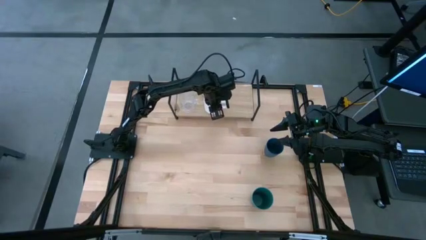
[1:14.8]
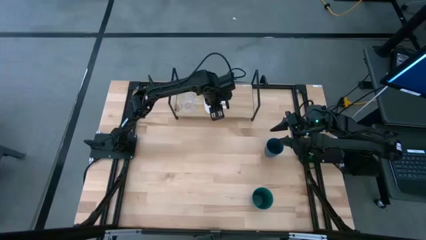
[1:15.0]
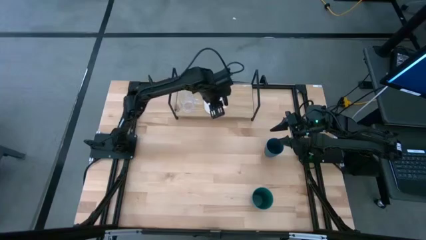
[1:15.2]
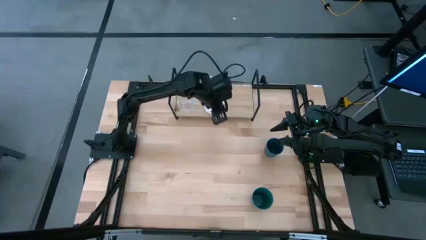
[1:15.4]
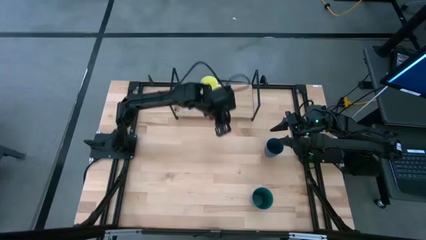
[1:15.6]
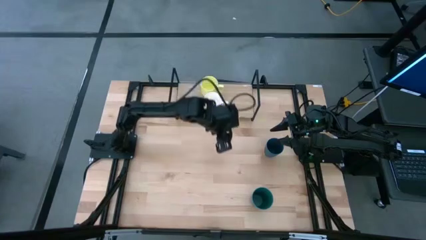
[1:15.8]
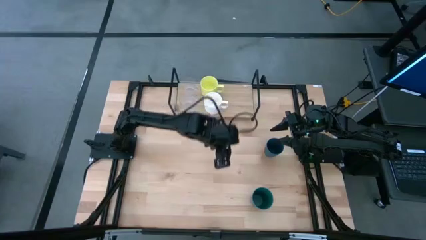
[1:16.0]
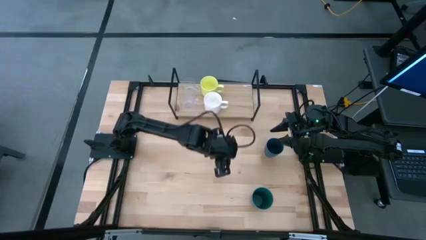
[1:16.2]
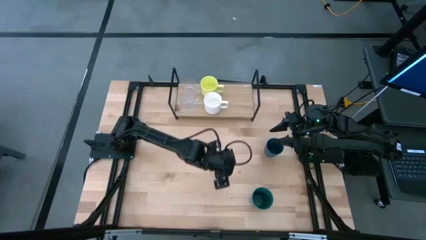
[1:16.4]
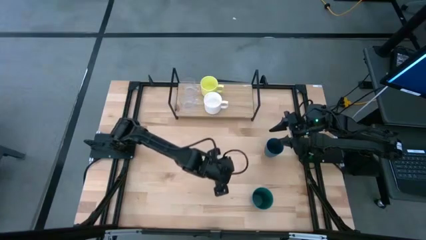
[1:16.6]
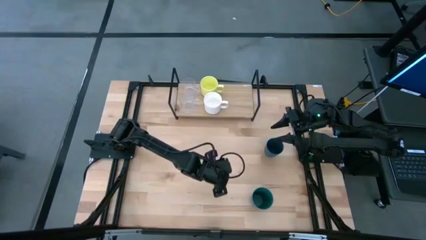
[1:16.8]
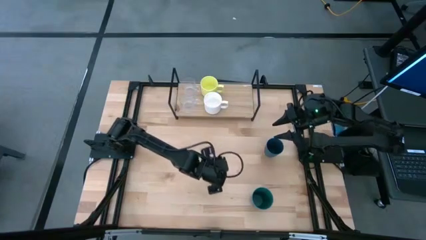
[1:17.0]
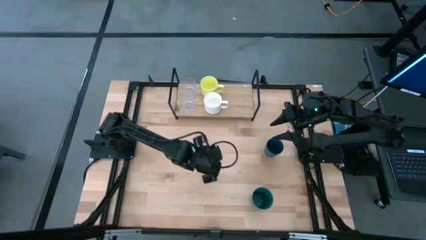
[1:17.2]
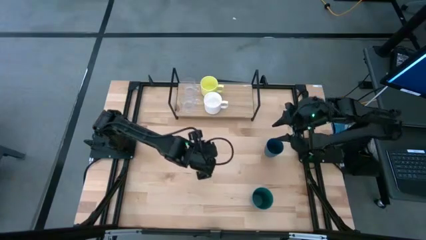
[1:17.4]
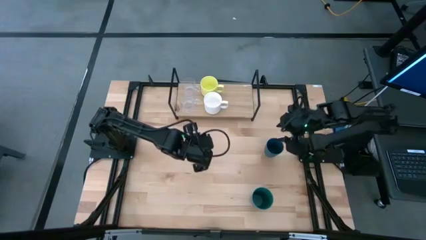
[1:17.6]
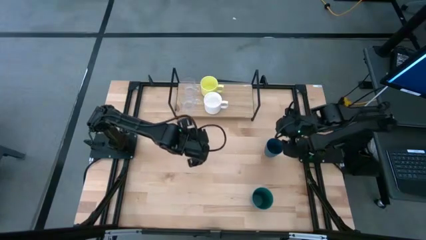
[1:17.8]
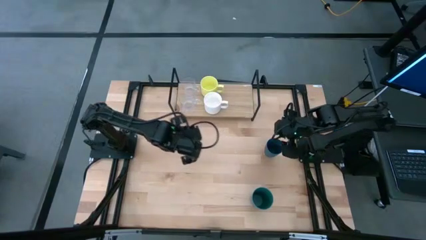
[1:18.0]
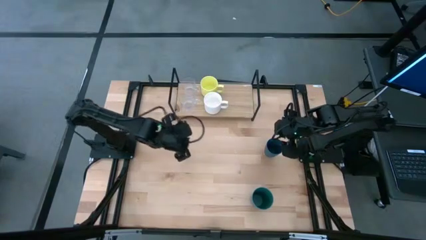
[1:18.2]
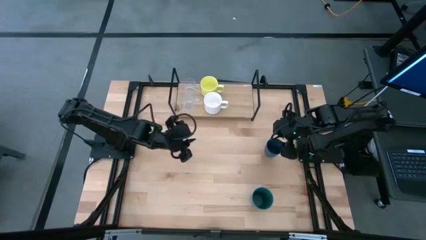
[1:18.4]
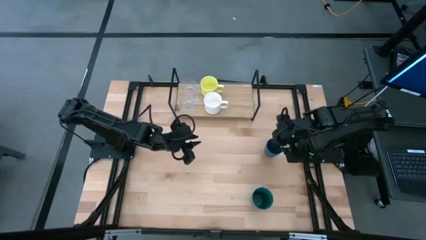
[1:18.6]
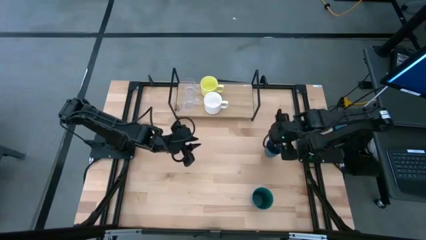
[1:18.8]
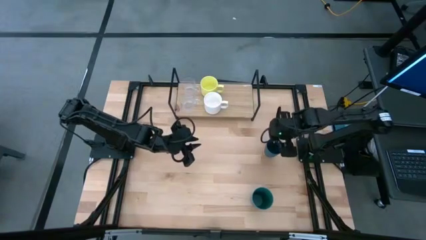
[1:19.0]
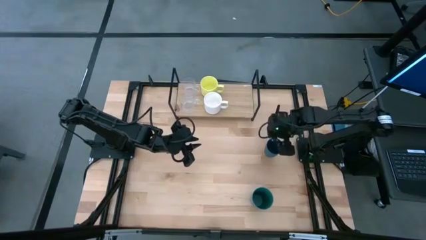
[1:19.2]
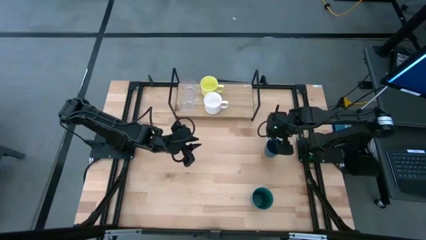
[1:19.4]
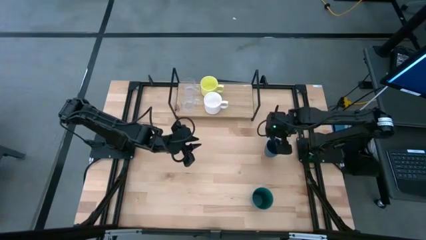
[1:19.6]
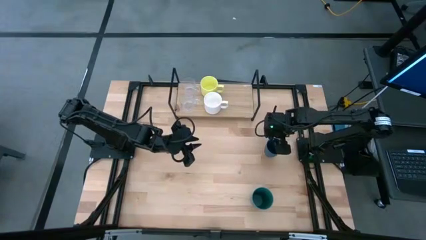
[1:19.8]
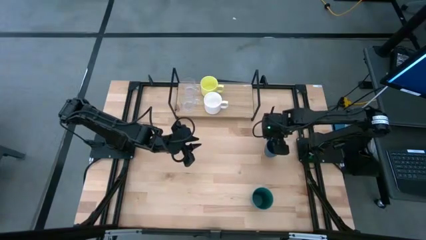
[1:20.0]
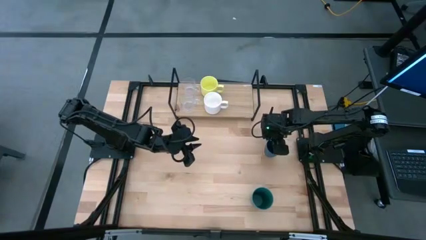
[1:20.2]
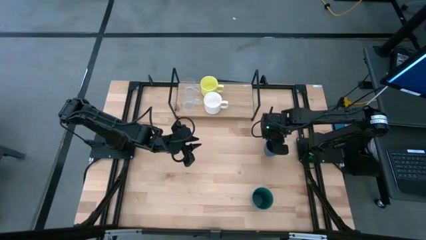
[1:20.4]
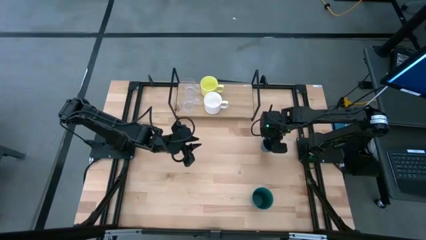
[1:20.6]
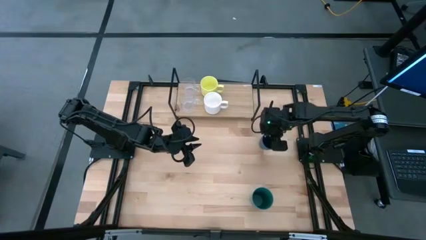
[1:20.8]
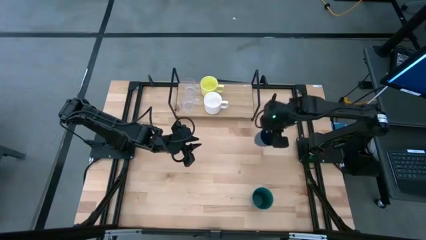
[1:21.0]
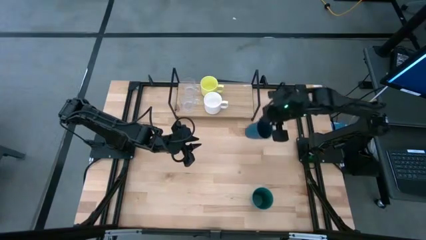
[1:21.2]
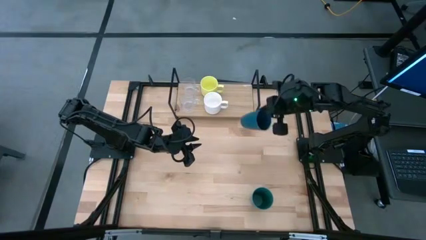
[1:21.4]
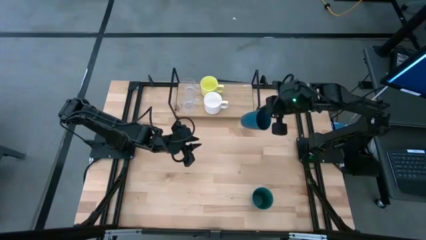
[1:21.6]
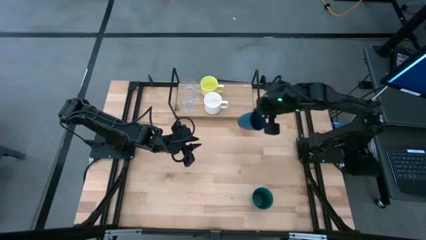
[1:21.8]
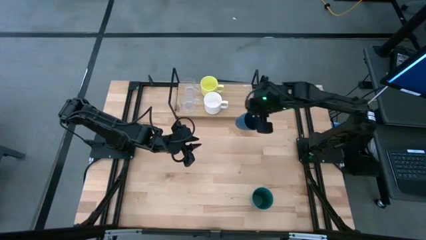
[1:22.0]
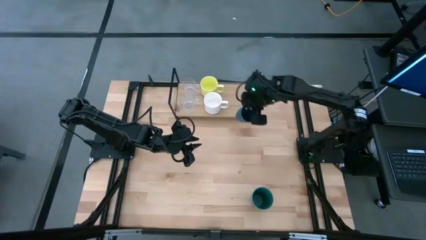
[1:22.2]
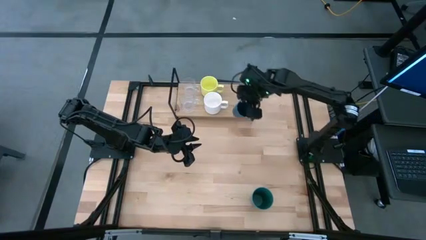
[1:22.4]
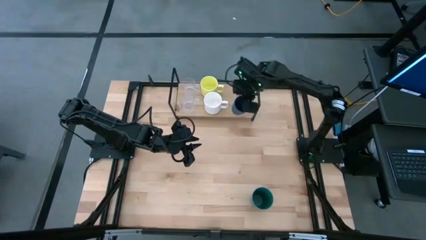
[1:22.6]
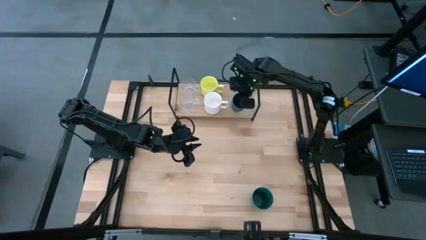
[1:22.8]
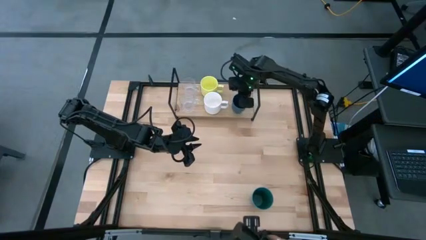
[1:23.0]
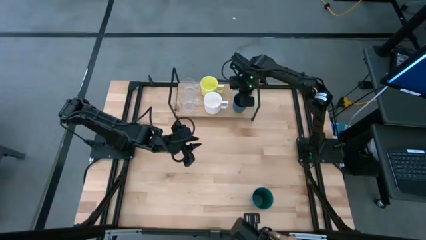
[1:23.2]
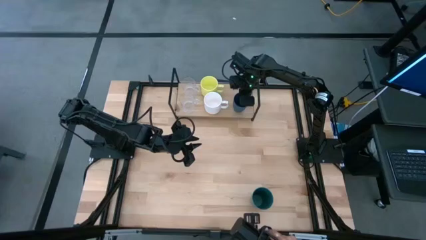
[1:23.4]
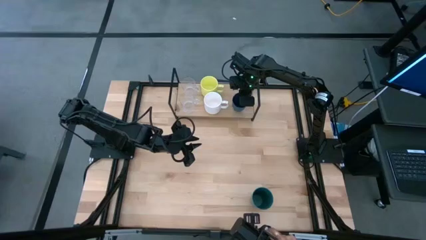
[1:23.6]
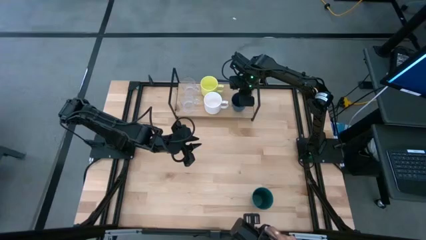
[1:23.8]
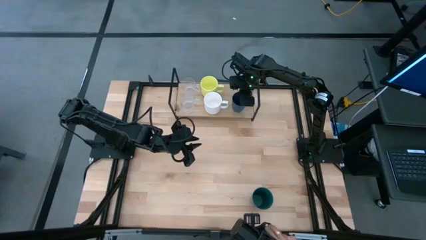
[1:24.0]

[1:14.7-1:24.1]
Task: Stack small to large cups/mugs on shelf
Put the dark blue cup on the shelf

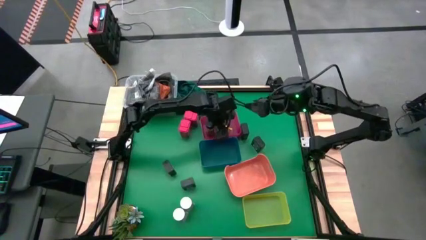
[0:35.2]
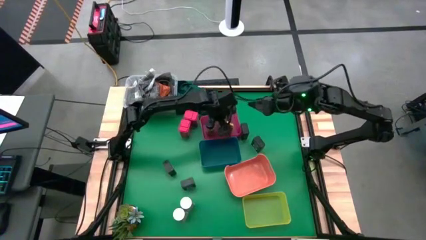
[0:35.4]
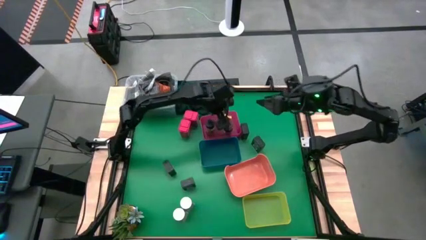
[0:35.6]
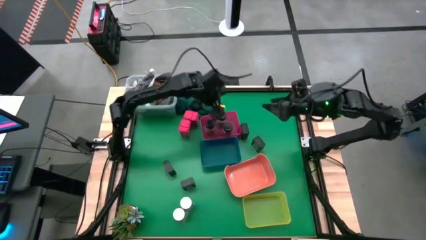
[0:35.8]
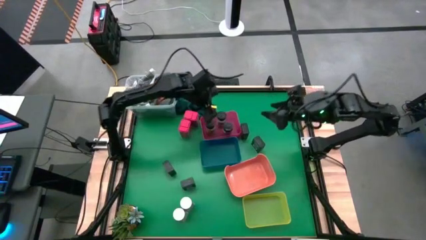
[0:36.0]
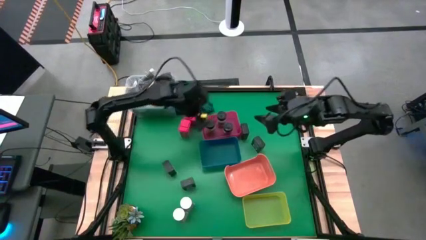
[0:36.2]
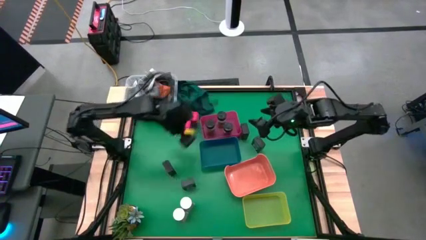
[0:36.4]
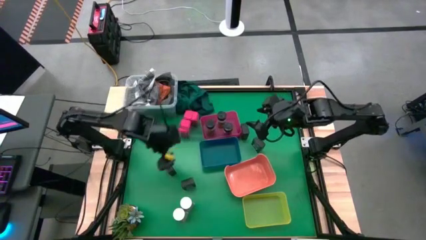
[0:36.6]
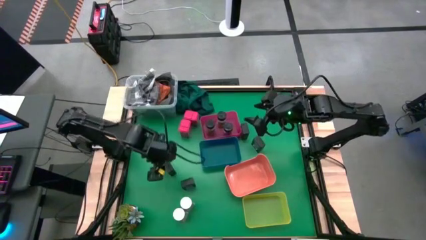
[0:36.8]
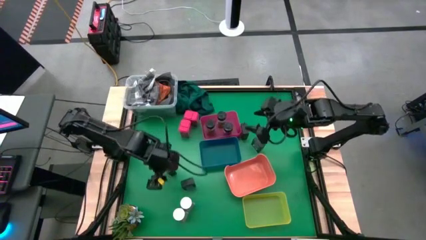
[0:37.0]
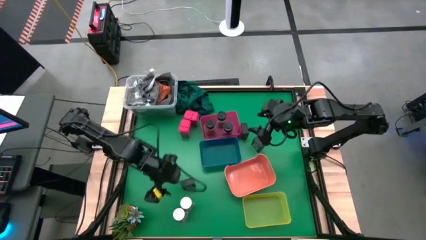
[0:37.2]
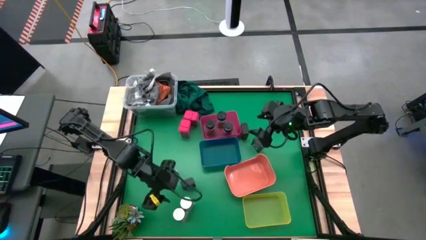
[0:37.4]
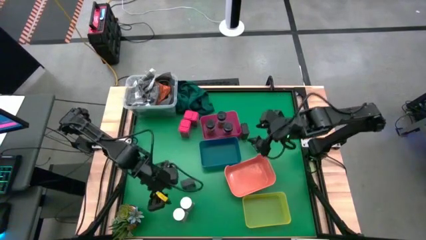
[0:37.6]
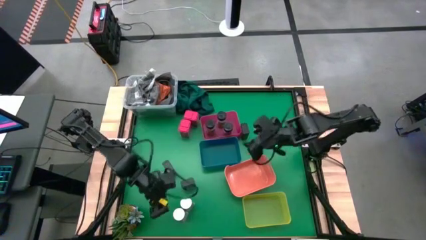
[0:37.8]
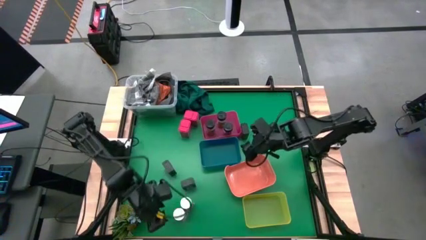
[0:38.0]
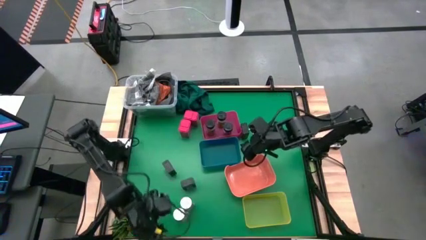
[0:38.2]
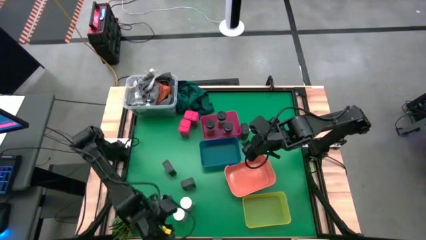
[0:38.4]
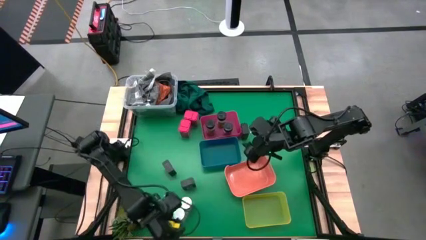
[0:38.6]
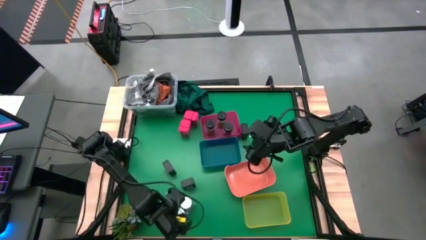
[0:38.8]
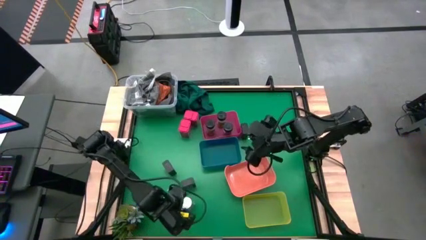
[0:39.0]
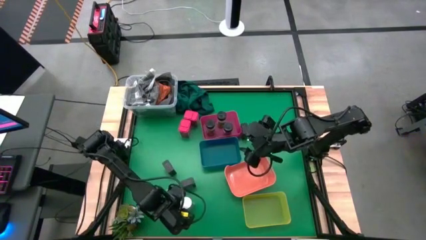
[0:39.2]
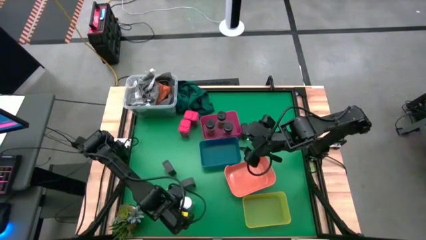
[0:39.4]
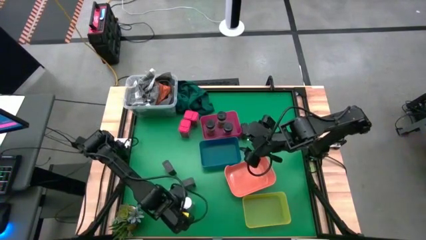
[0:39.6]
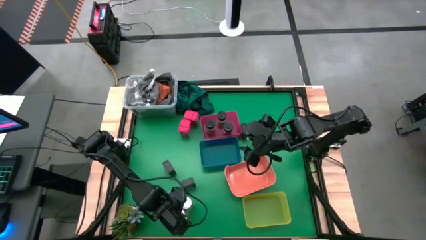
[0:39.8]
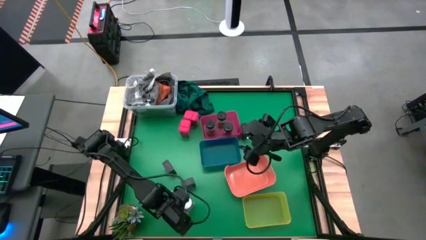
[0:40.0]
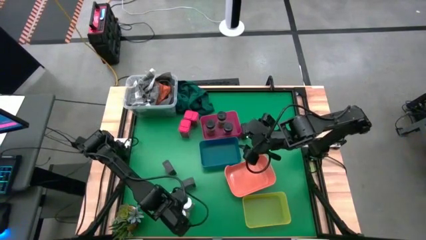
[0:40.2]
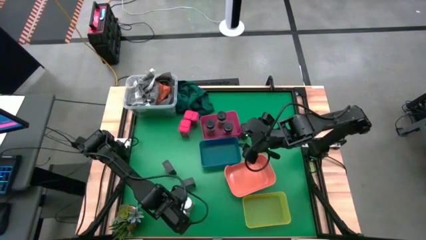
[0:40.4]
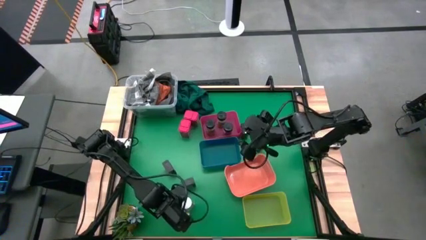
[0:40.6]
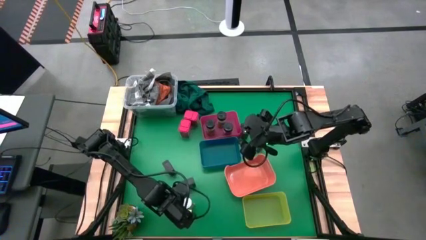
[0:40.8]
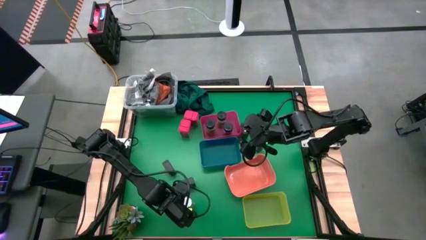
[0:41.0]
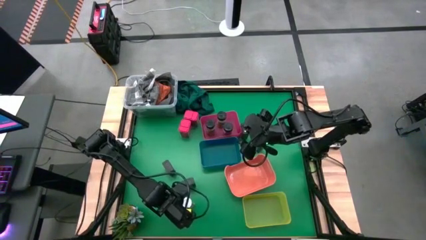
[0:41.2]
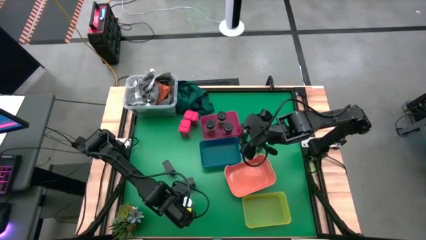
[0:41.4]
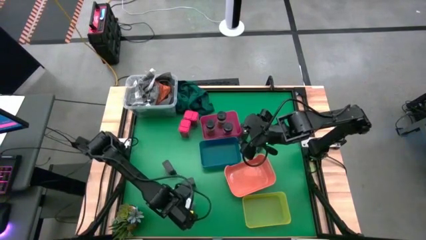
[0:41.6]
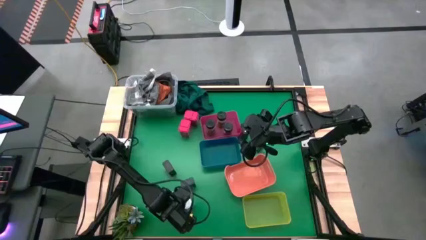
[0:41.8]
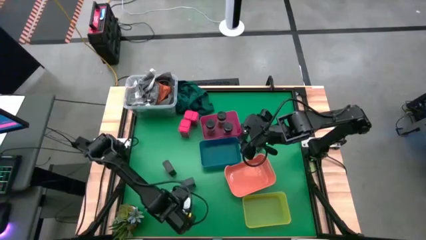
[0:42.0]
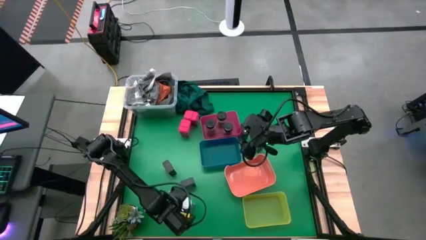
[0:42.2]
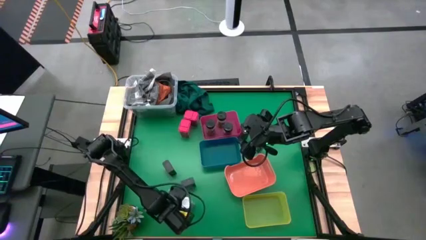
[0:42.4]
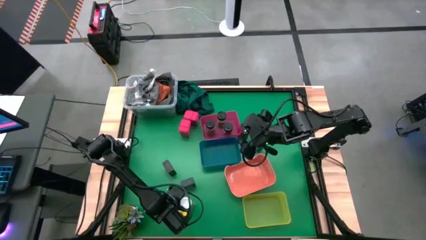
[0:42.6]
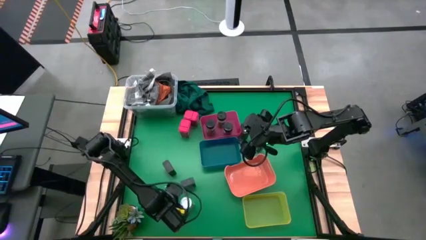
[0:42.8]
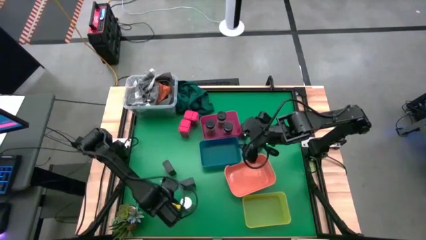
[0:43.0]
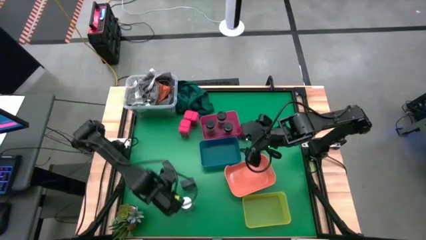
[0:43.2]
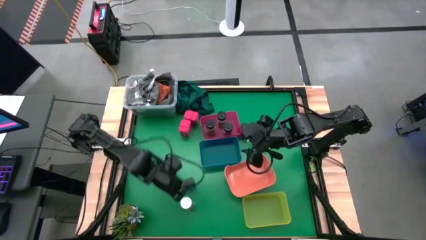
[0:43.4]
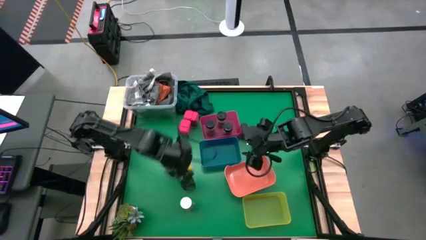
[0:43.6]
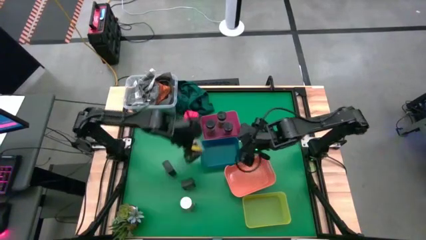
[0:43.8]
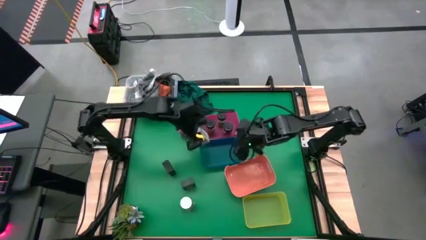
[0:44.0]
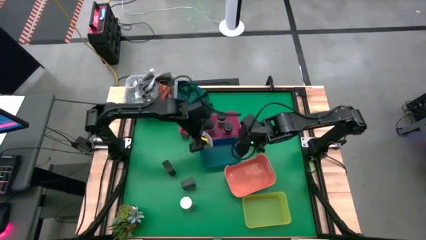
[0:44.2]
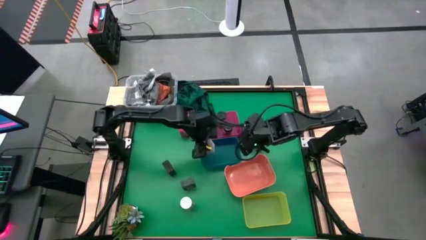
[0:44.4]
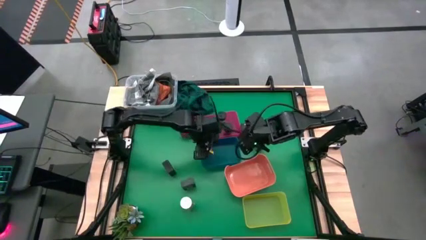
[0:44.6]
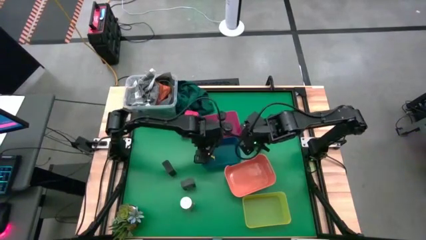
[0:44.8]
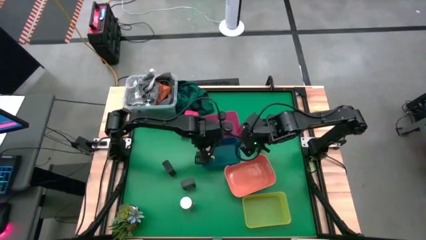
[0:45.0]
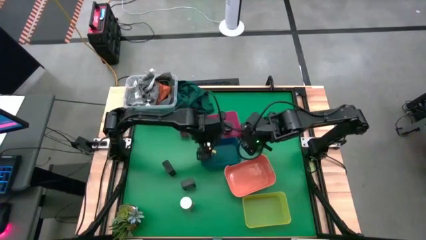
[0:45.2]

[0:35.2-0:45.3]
Task: Sort spices by type
Put the bottom white seasoning bottle into the blue bin
